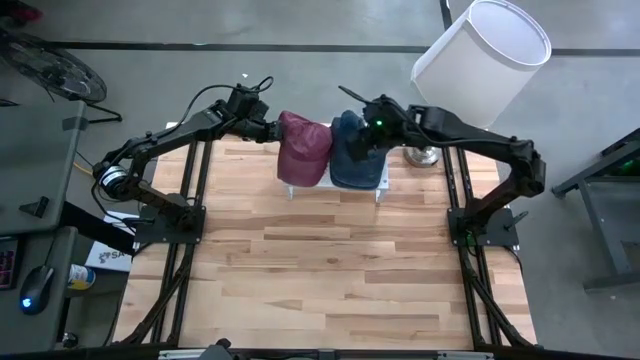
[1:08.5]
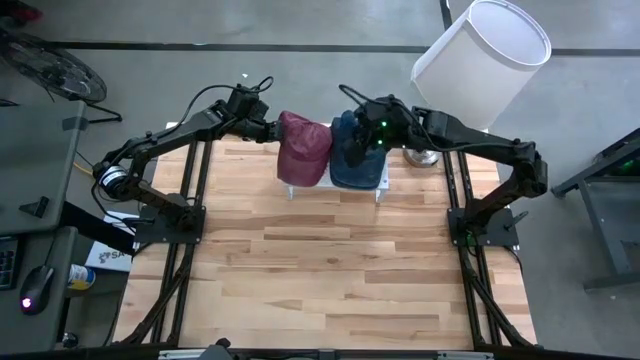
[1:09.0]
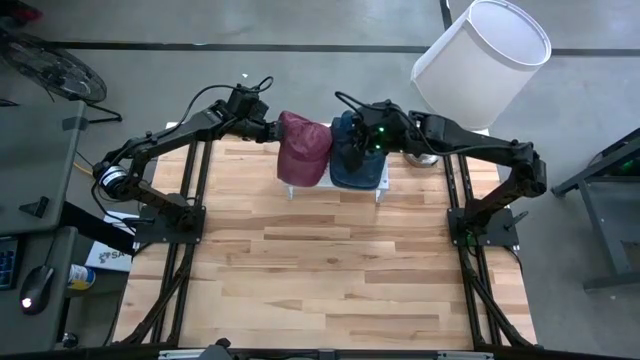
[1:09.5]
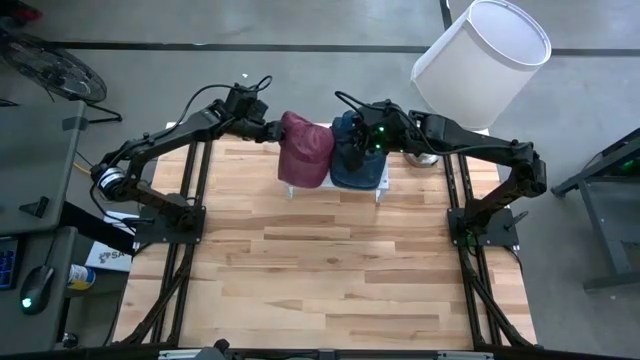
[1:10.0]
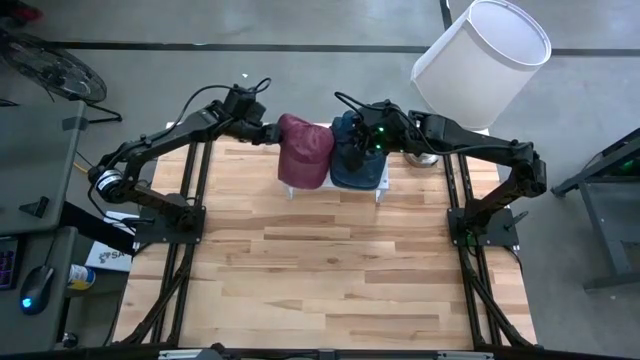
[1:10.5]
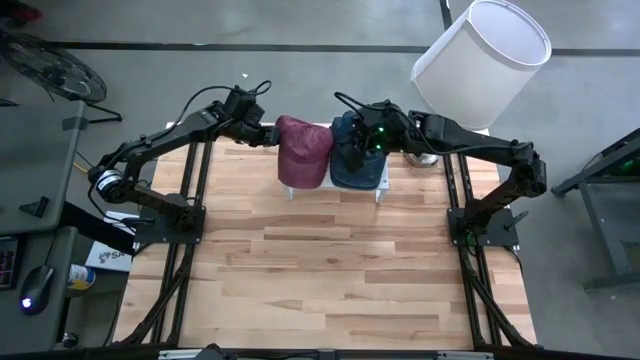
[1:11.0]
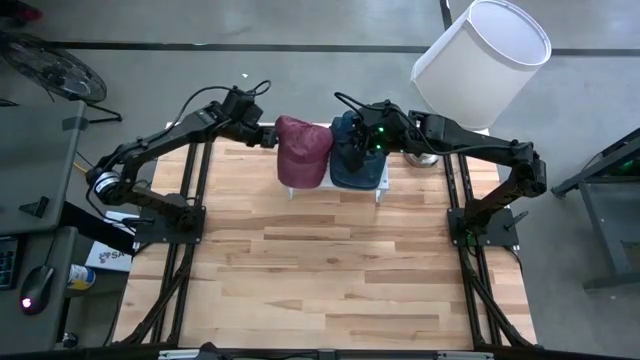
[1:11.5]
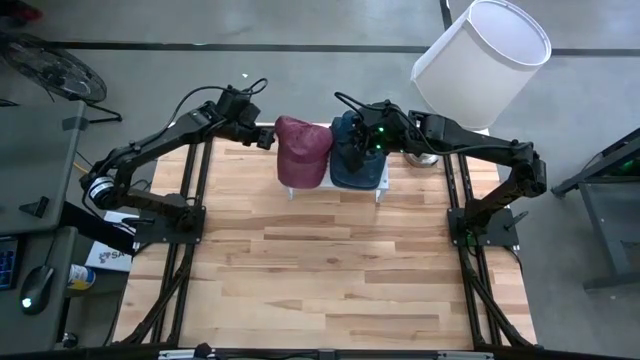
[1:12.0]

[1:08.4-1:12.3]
Task: Pick & Place hat
Adjust the stacked red cap on the shelf

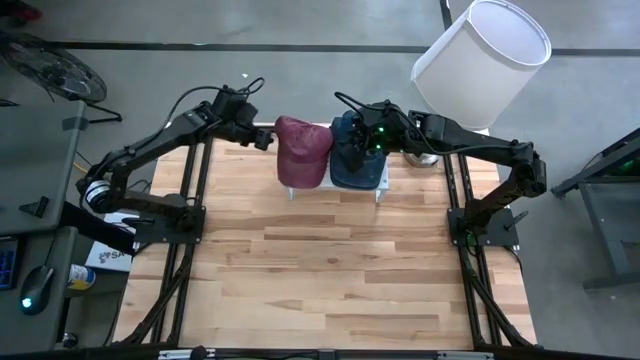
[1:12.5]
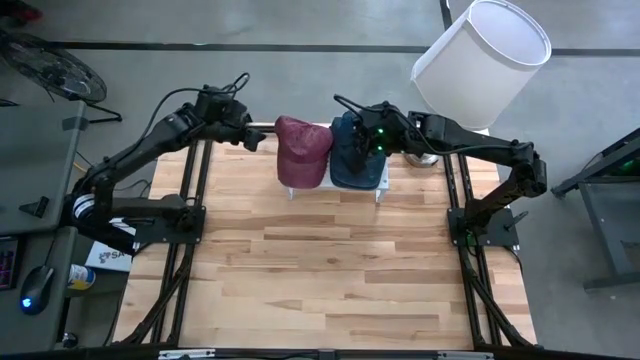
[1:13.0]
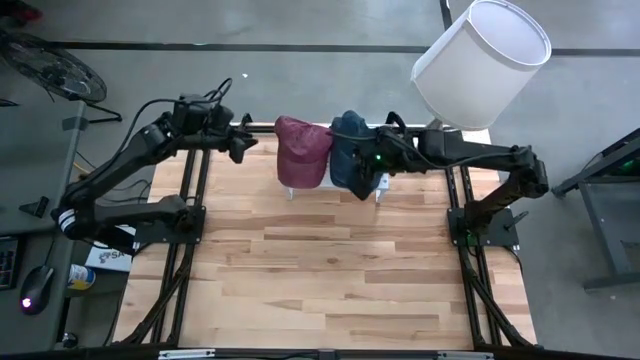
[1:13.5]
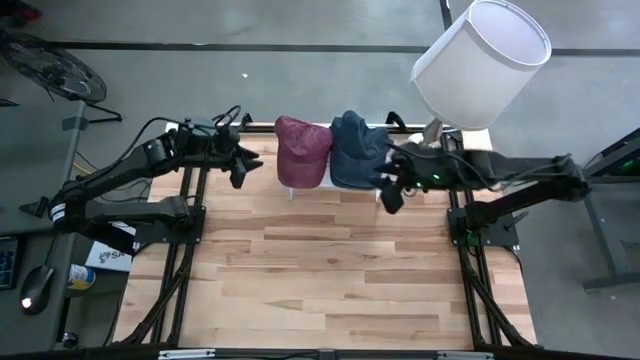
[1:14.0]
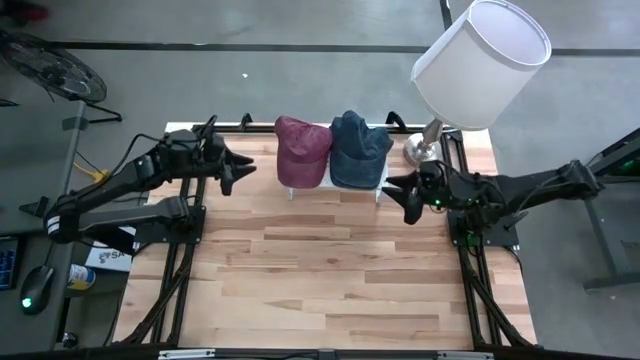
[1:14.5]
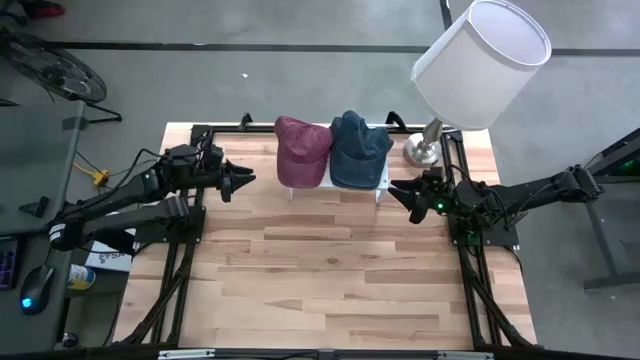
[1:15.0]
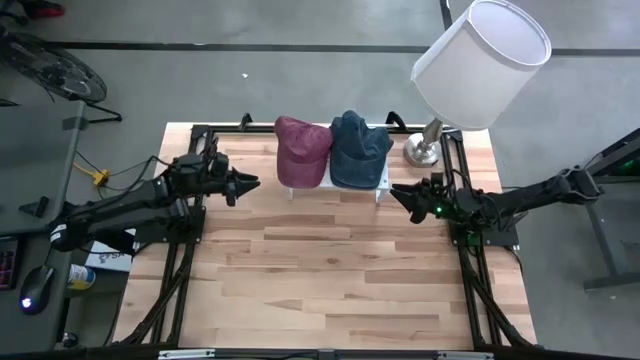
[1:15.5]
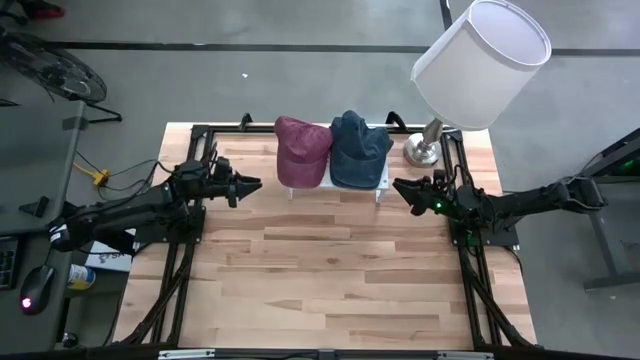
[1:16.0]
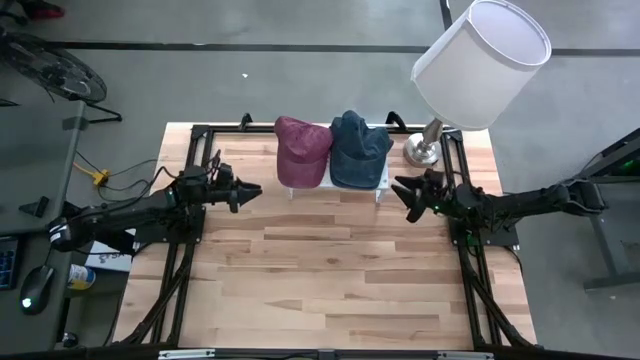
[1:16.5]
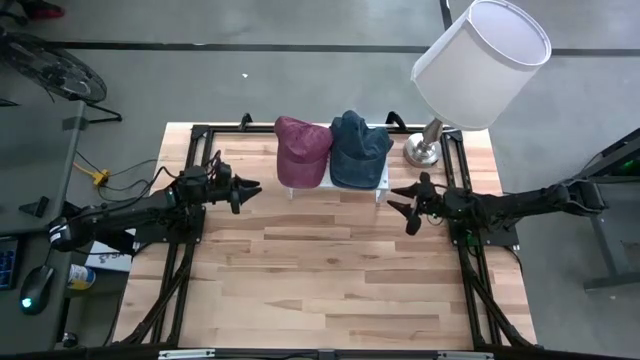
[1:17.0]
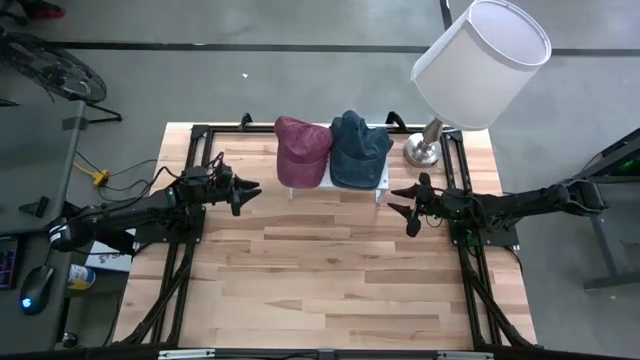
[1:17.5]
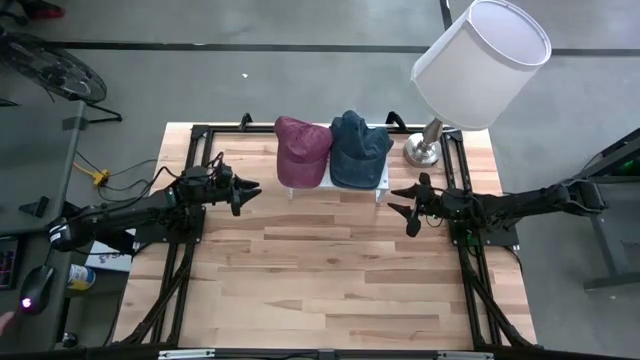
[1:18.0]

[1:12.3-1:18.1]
Return to Home Position

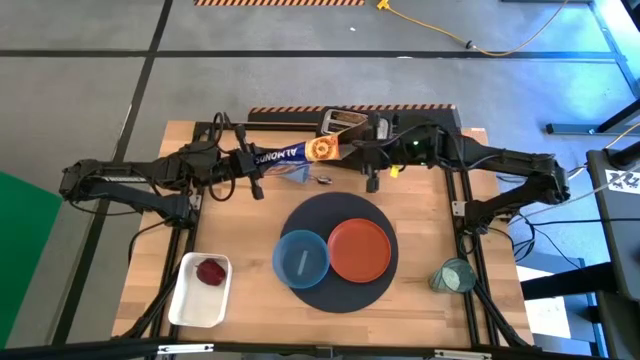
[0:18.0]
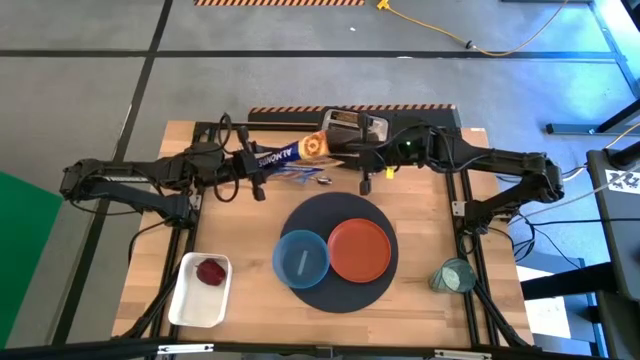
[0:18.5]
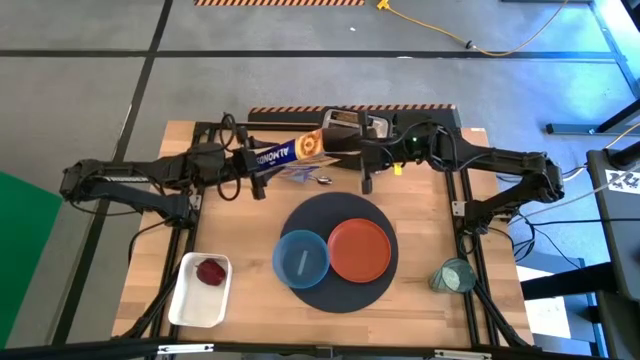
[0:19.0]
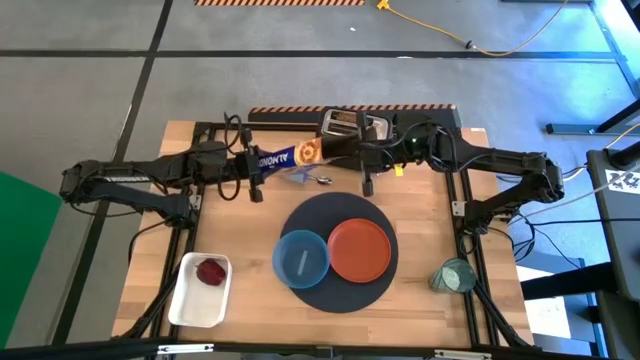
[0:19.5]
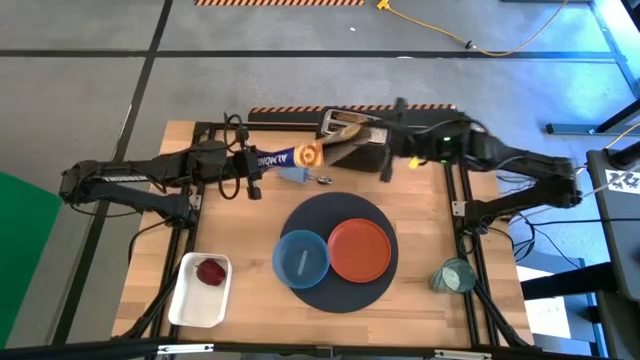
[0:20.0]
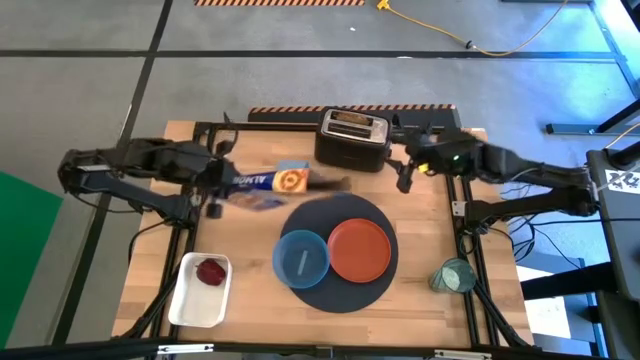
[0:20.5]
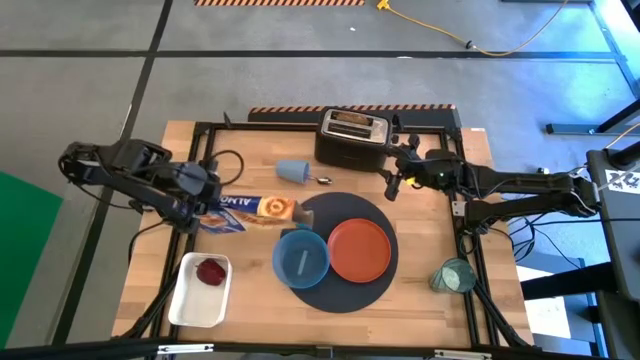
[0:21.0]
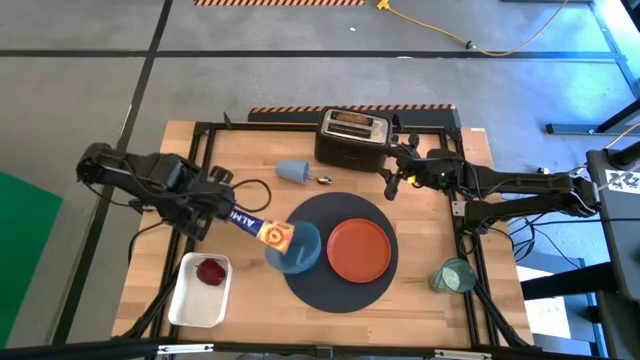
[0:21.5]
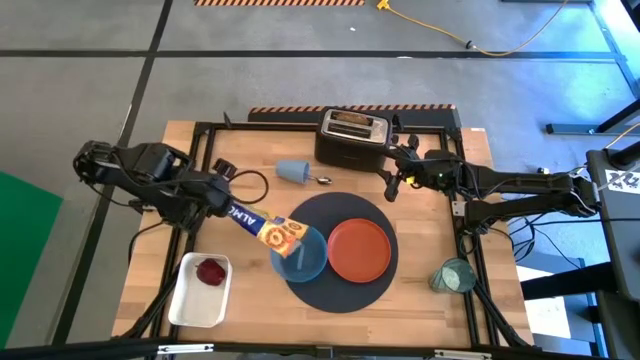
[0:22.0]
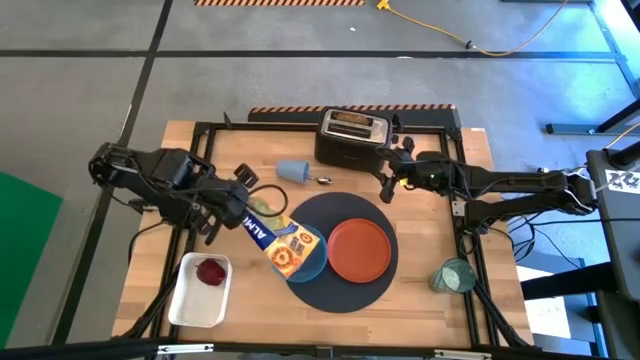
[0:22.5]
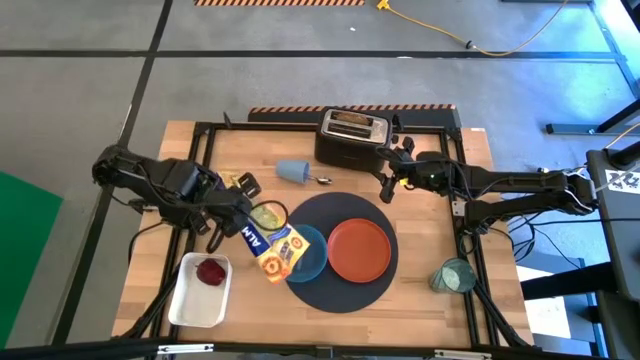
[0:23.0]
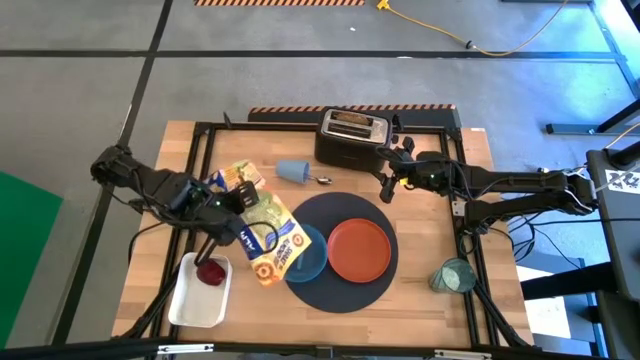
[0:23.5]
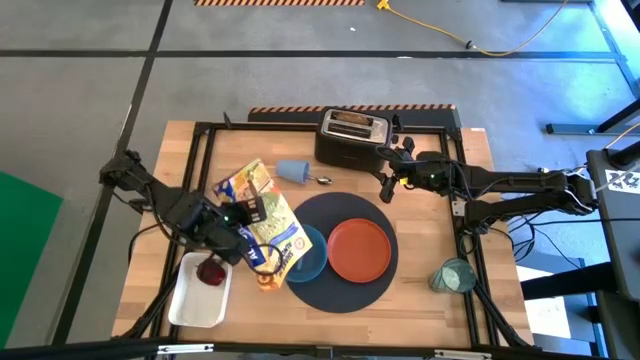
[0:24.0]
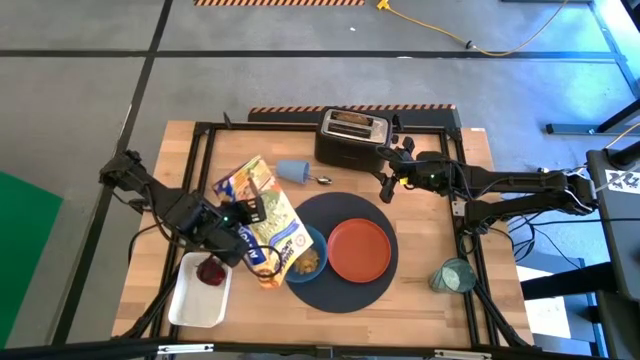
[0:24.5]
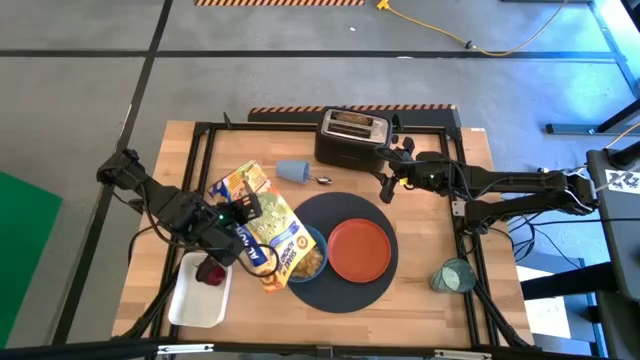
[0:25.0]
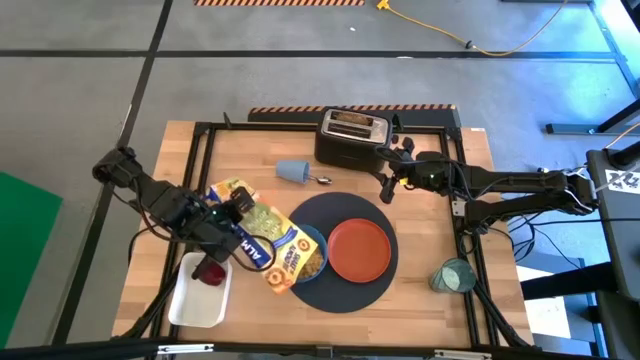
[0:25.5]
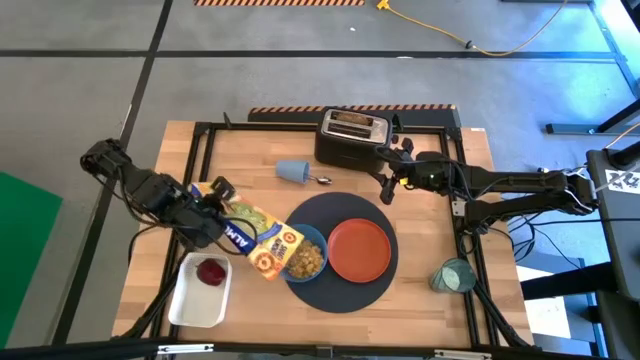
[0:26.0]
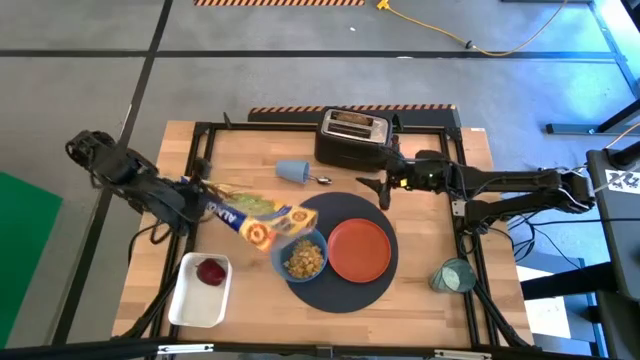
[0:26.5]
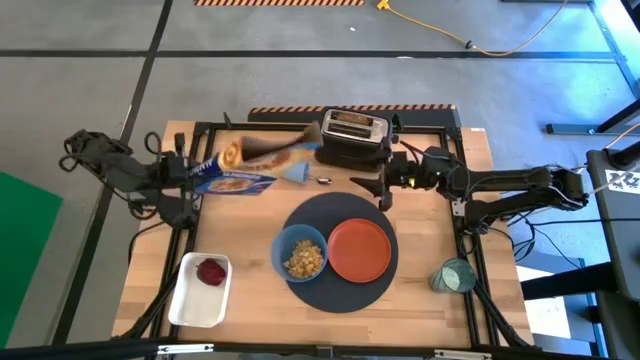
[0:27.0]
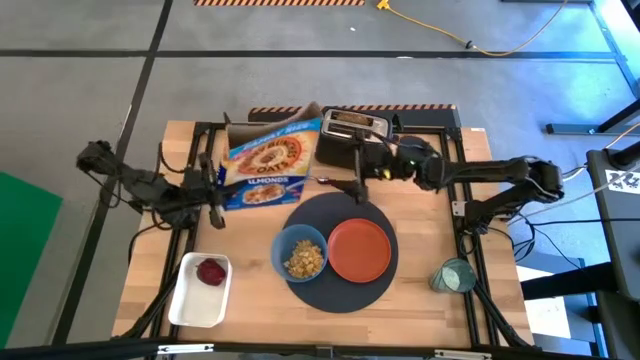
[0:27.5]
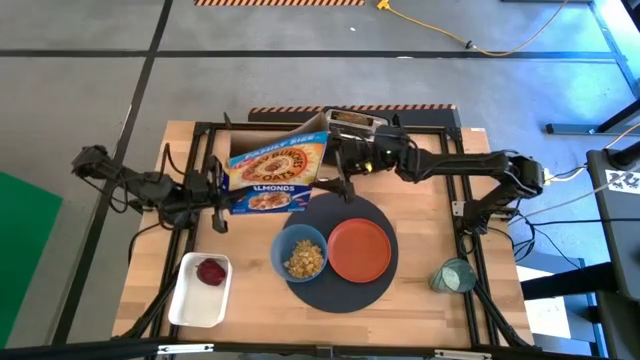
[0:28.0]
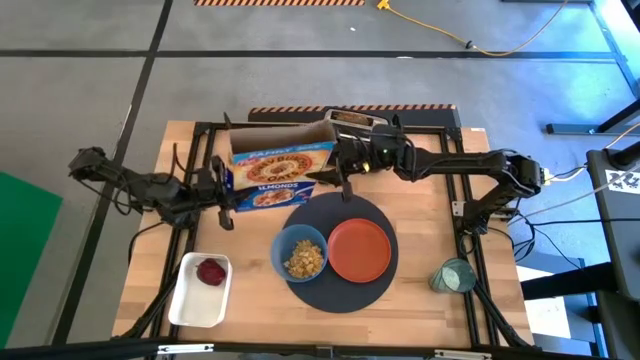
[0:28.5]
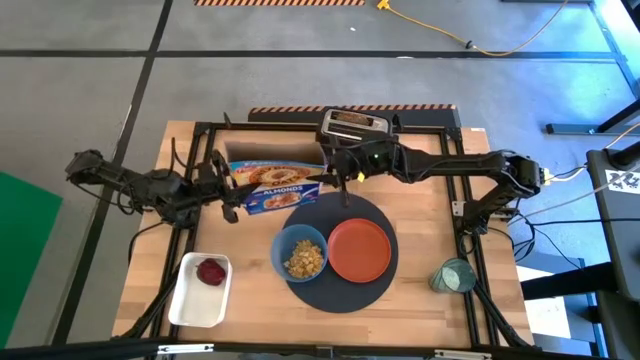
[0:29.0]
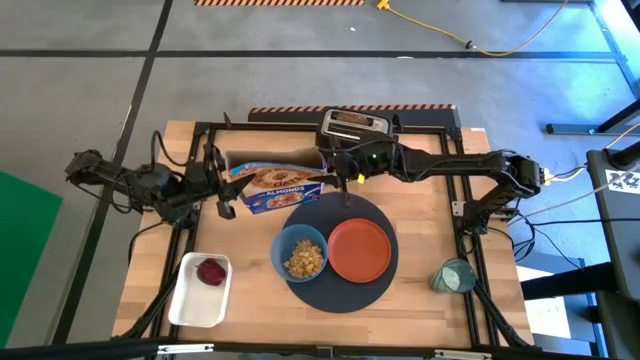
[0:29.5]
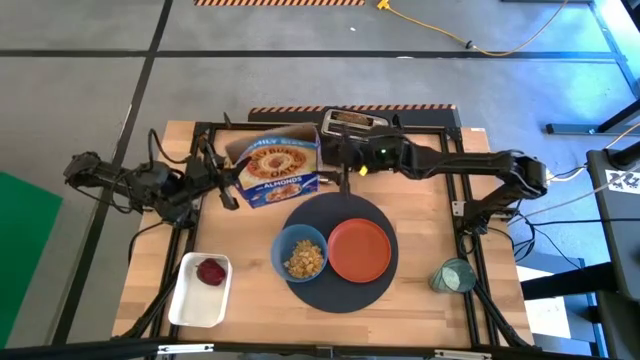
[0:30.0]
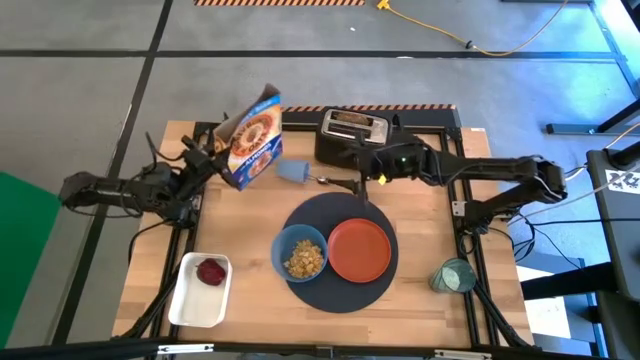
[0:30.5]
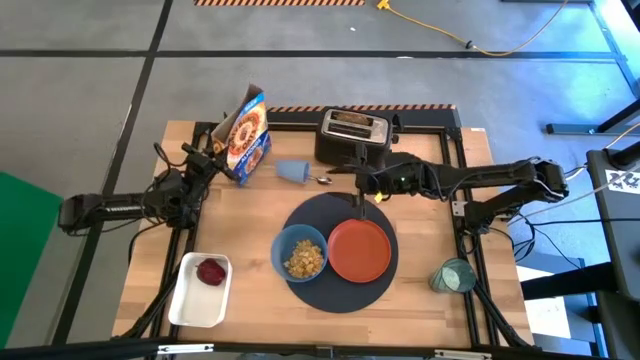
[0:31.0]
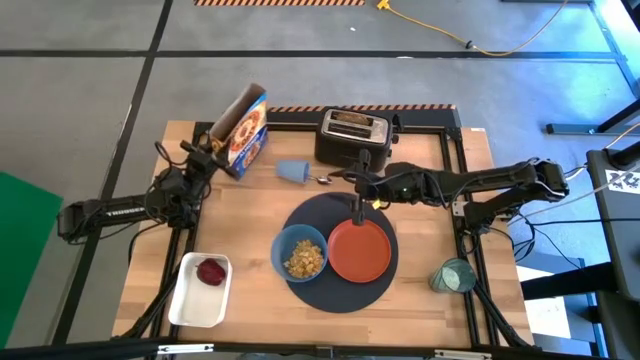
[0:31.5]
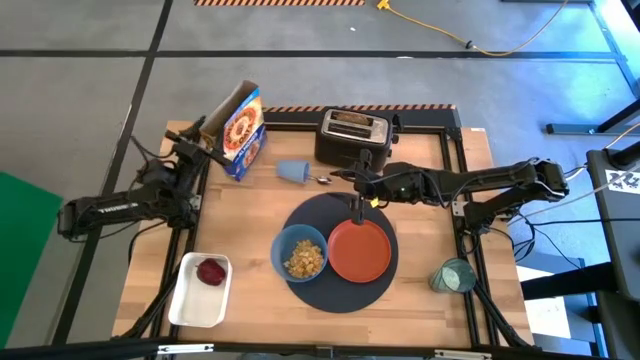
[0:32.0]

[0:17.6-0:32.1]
Task: Arrange a breakfast setting
Pour the cereal from the cereal box into the blue bowl
